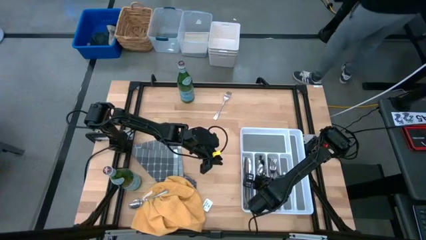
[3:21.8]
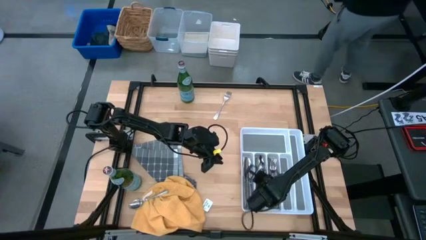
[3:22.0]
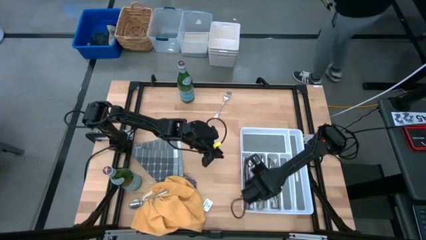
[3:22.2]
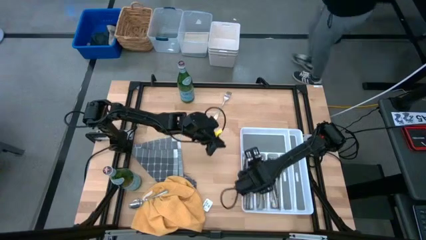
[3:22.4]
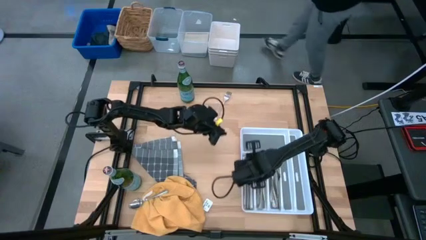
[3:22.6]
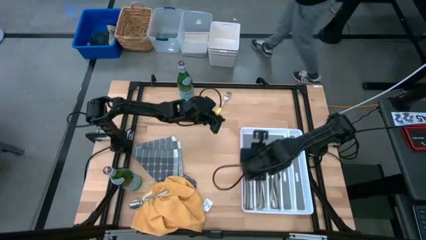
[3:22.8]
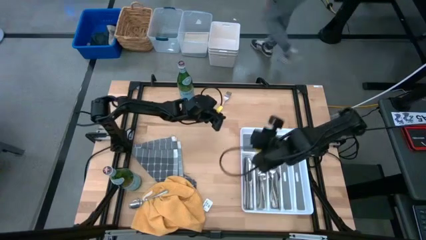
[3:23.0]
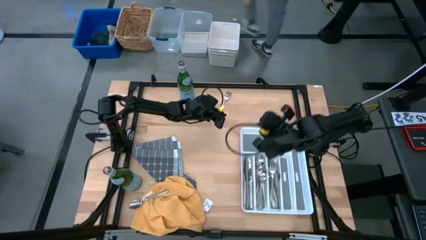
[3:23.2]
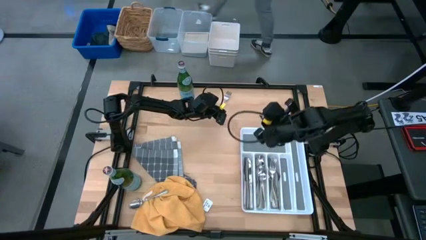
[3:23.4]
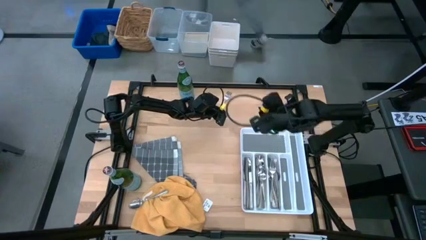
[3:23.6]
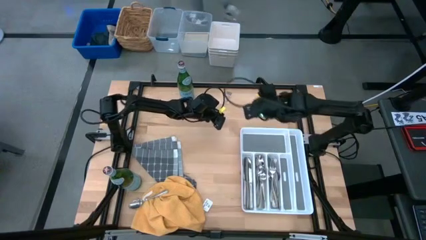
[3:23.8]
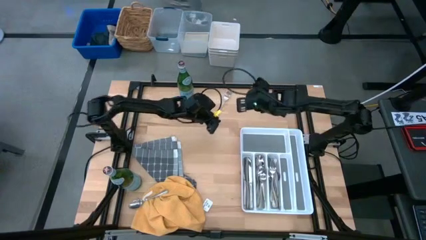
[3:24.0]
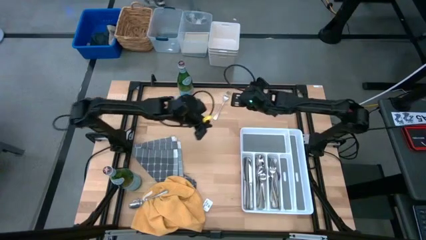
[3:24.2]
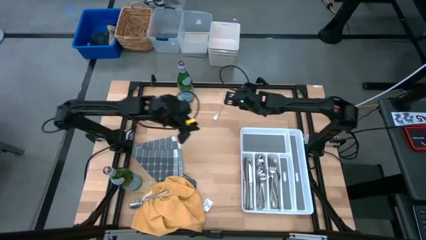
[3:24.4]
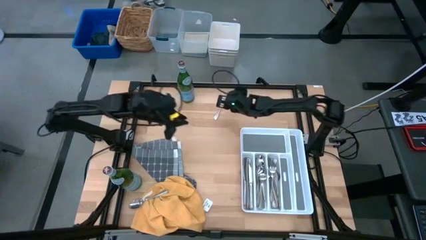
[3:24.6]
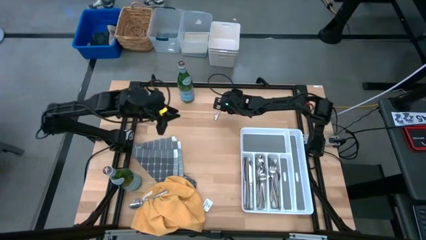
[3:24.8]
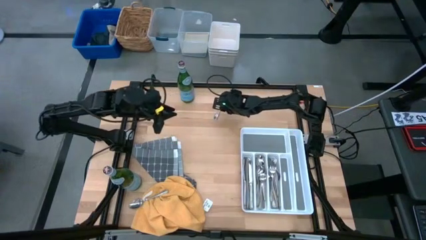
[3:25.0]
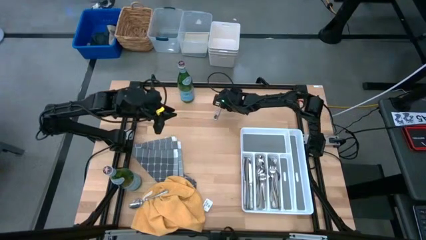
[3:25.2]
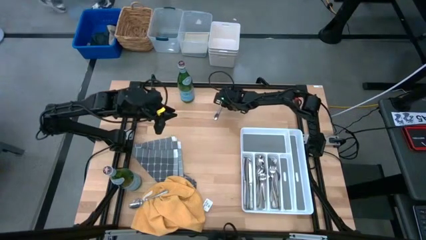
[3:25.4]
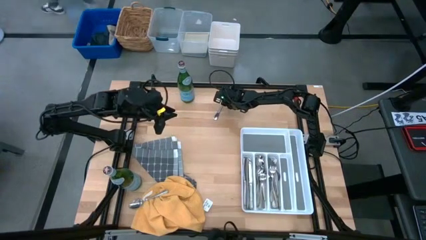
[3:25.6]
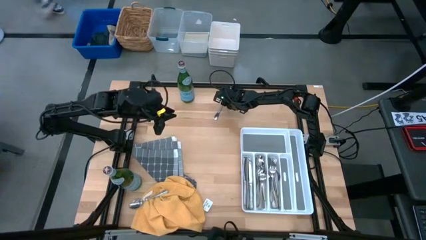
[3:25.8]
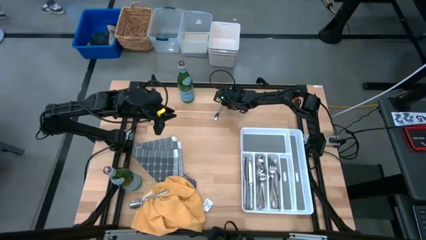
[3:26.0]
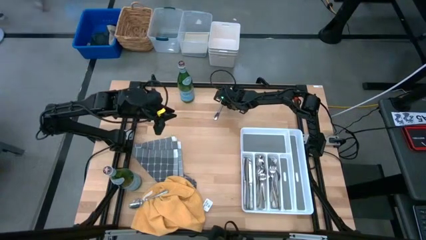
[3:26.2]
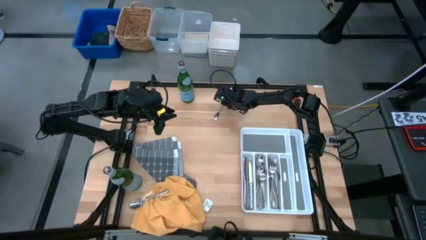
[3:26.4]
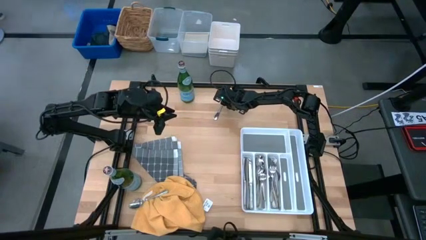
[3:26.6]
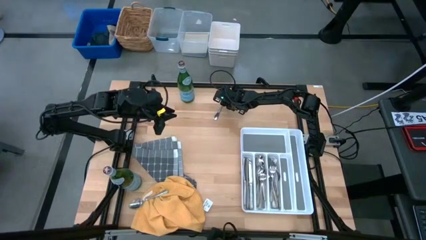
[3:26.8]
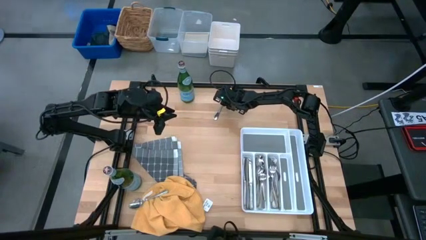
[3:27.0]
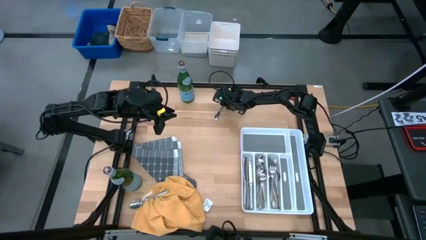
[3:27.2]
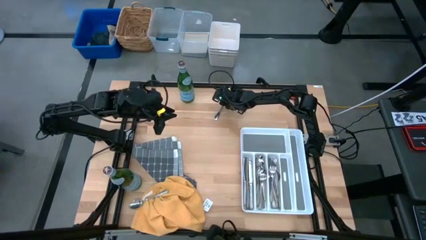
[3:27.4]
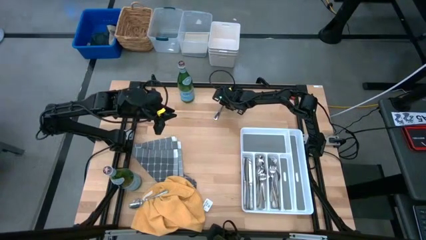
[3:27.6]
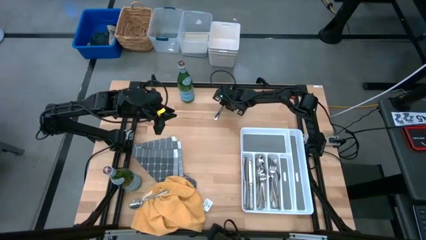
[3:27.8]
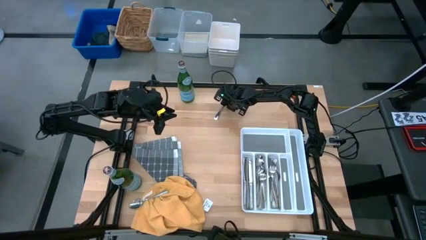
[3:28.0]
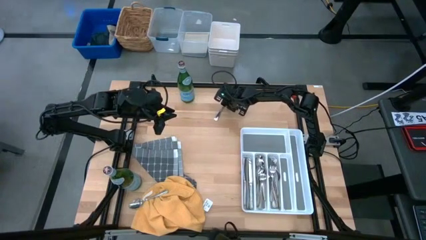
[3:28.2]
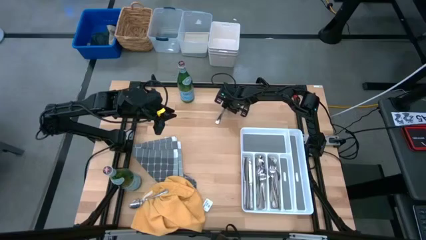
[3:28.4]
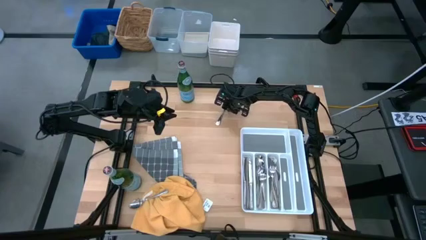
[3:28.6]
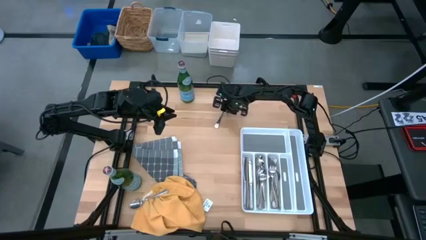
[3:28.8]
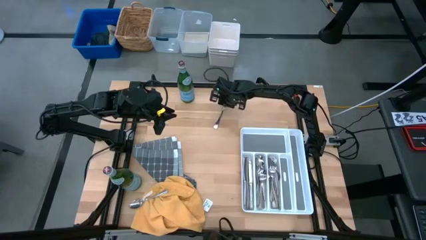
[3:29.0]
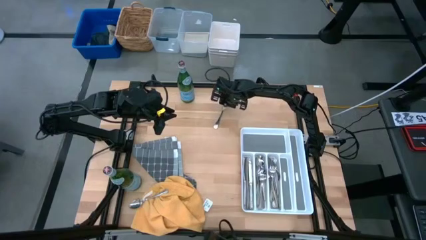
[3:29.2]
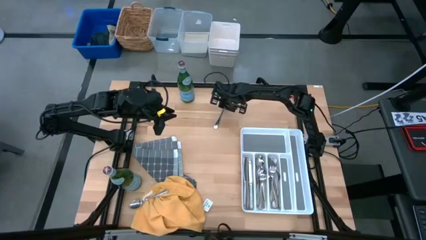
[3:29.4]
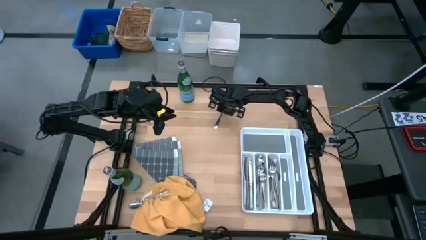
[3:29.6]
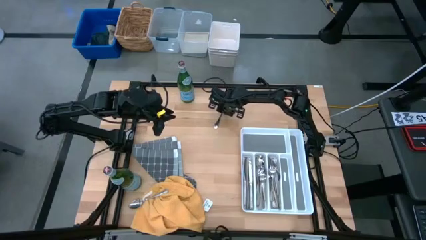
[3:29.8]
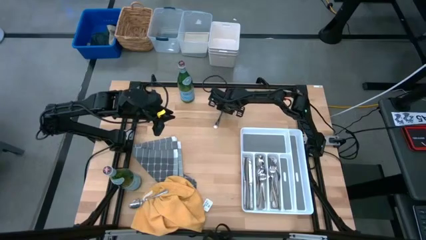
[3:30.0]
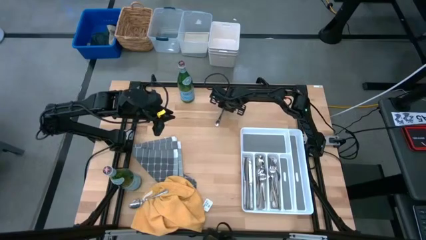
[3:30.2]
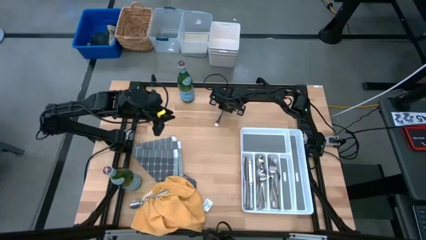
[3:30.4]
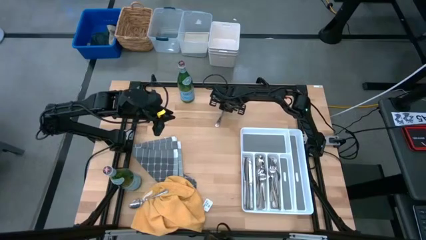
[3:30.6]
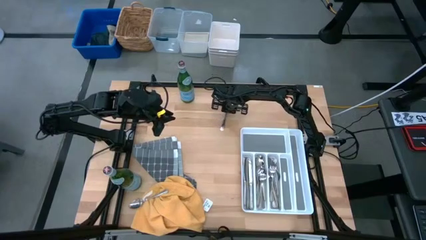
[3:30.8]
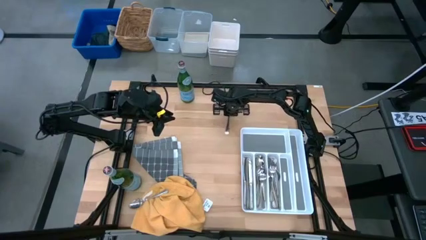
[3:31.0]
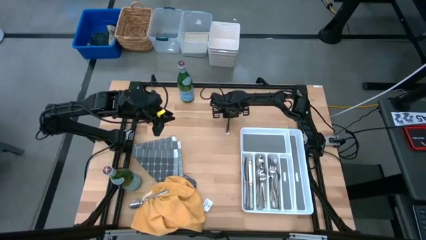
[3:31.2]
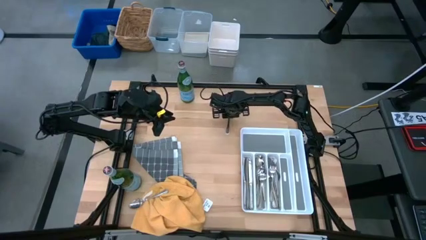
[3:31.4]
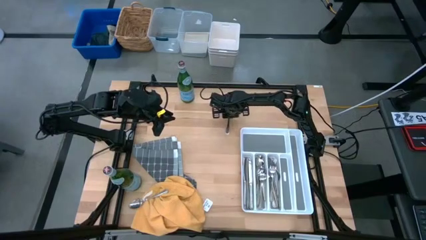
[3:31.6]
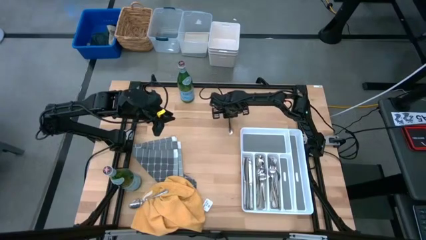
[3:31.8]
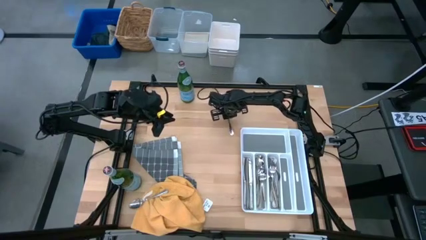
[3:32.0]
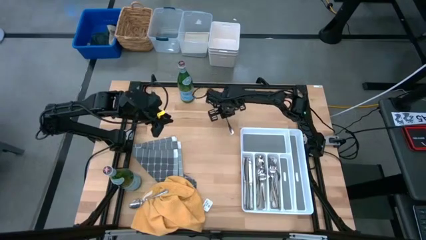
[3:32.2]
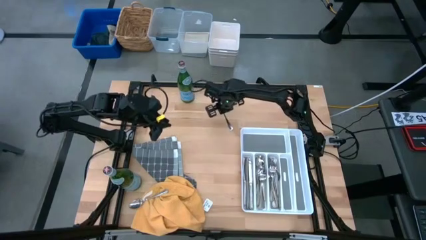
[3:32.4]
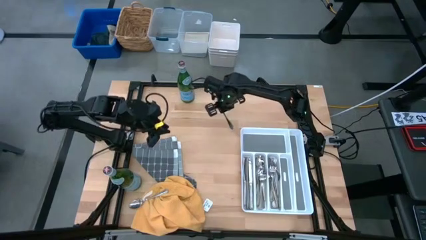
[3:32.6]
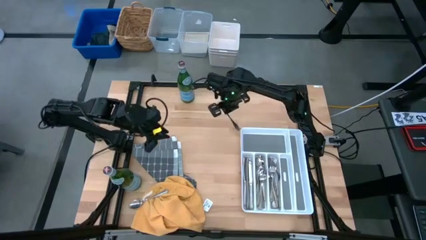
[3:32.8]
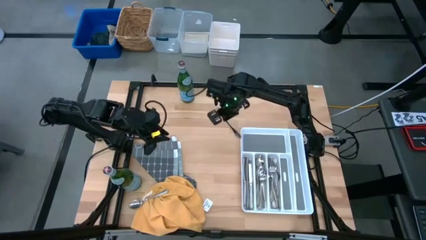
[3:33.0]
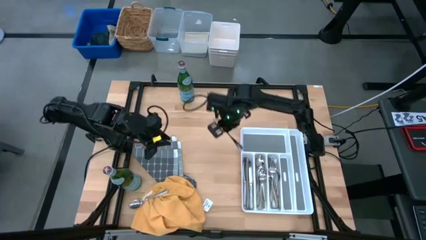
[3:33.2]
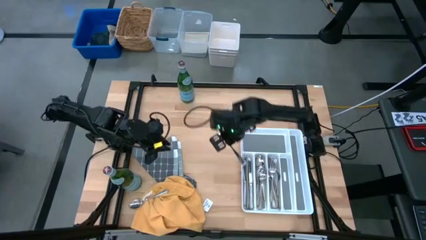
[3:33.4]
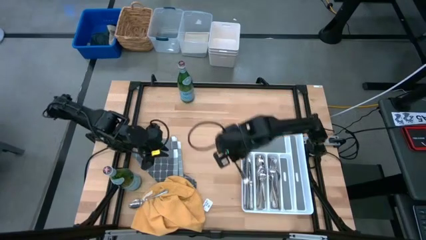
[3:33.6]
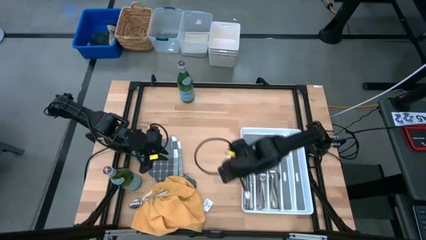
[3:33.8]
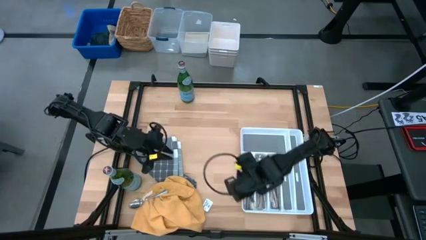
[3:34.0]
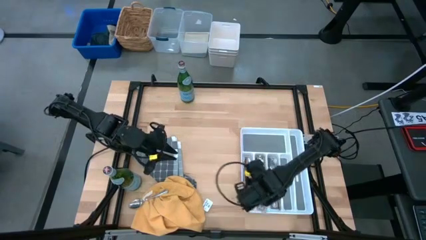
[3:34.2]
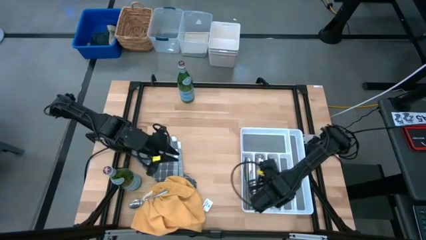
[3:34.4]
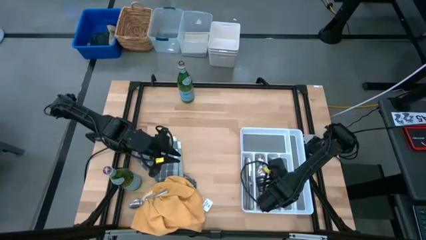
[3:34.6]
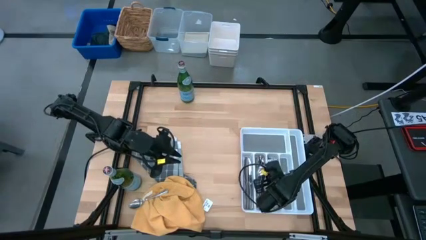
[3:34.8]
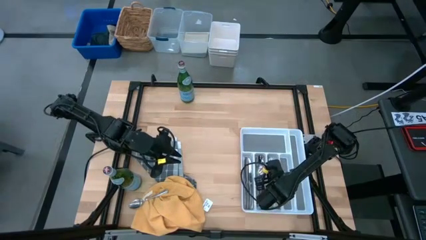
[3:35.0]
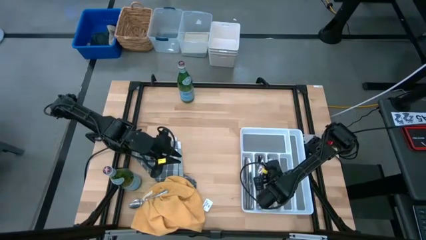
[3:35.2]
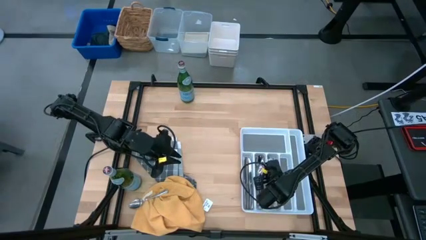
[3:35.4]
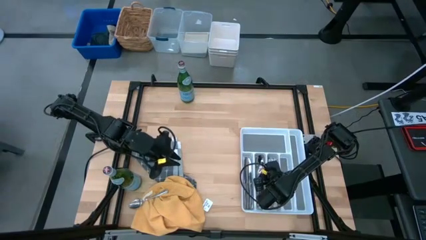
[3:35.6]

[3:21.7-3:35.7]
Stack the silver fork into the white utensil tray with the other silver forks
